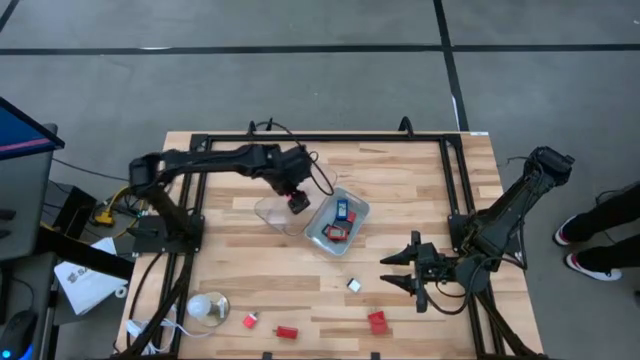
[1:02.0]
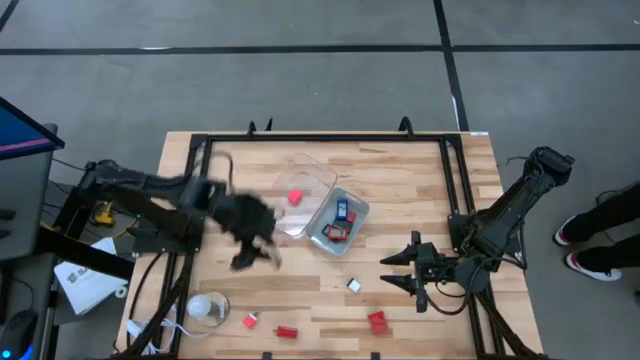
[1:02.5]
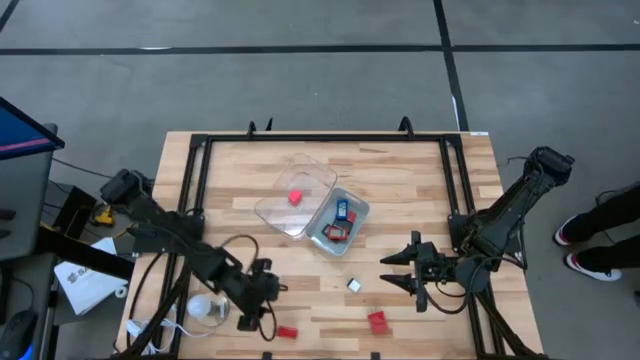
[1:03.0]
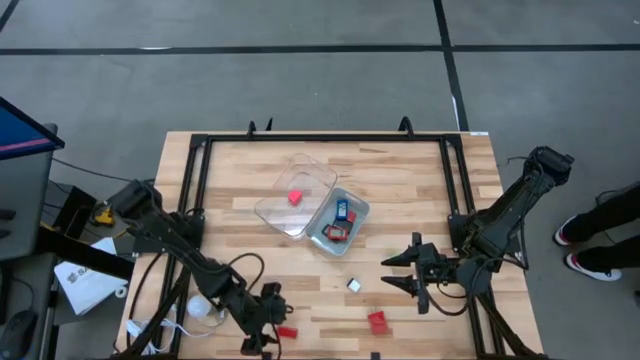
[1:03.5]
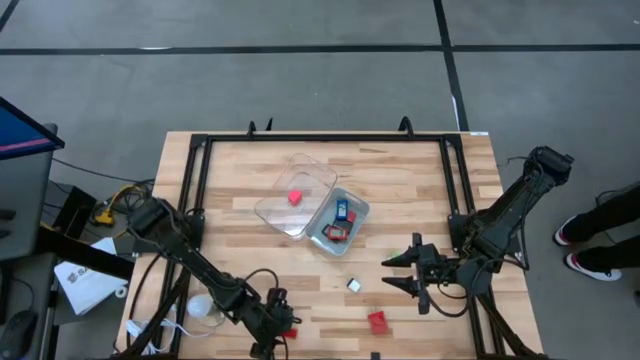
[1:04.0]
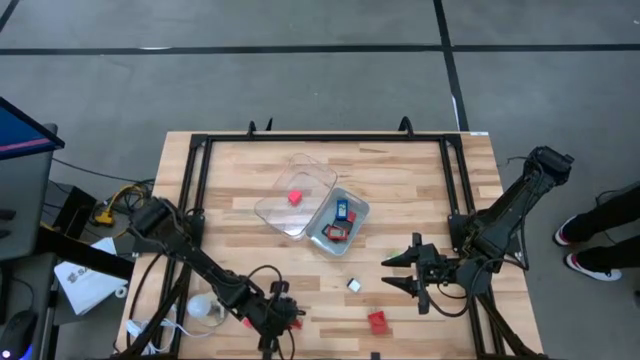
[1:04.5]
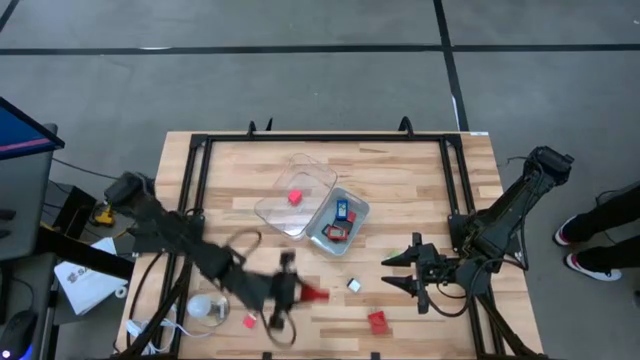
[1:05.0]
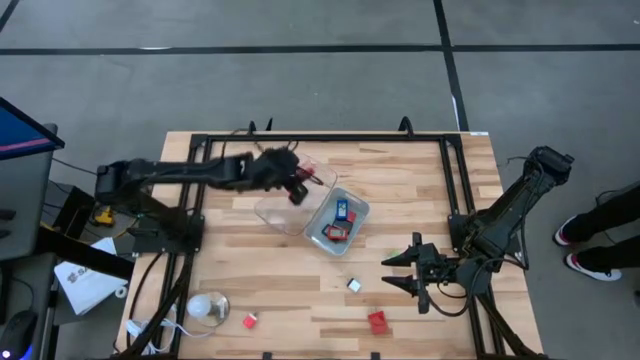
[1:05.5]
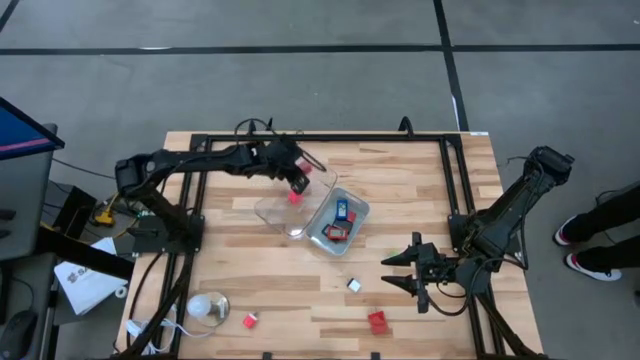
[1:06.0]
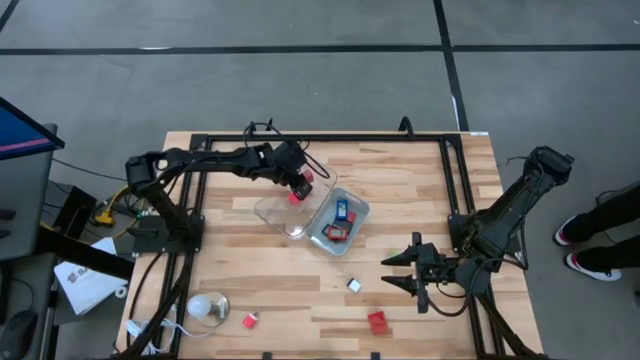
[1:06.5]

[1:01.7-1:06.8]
Task: Pick & Place Office items
Put the left red charger adapter into the transparent bin

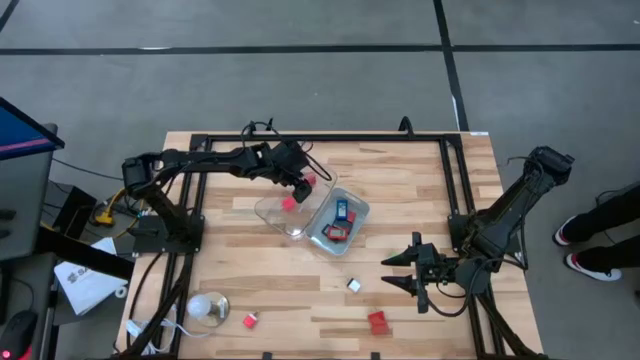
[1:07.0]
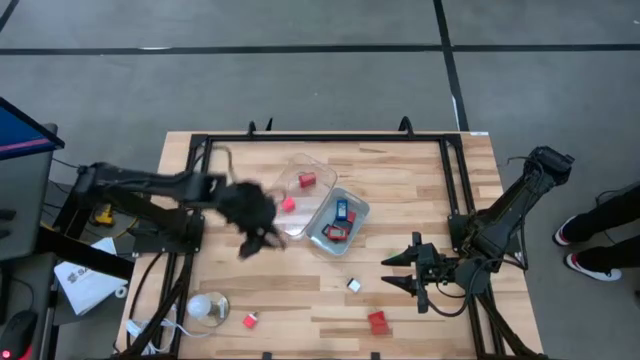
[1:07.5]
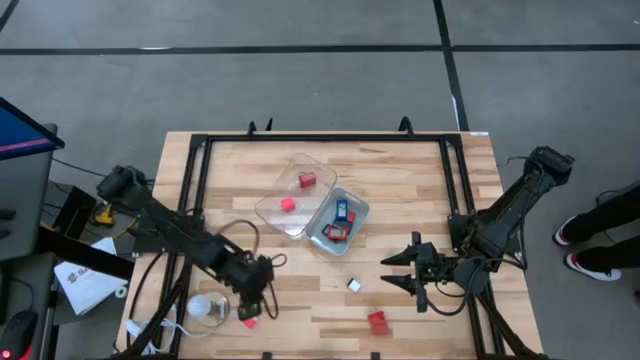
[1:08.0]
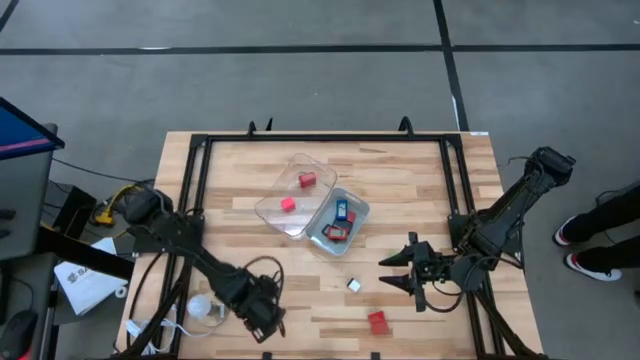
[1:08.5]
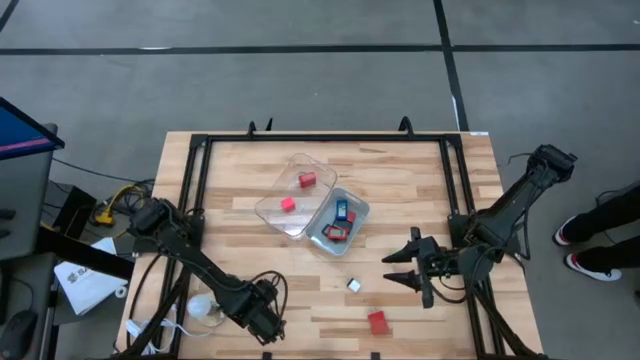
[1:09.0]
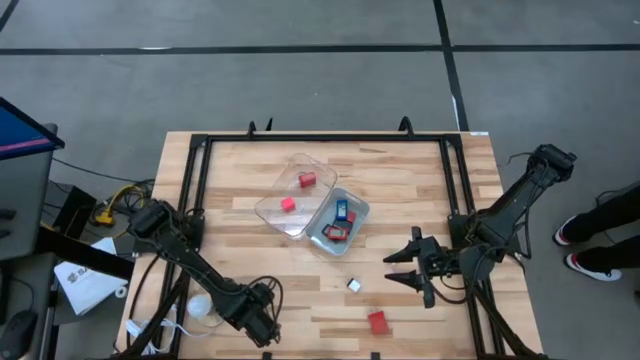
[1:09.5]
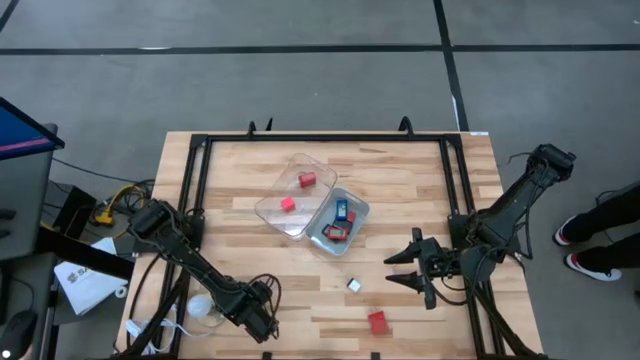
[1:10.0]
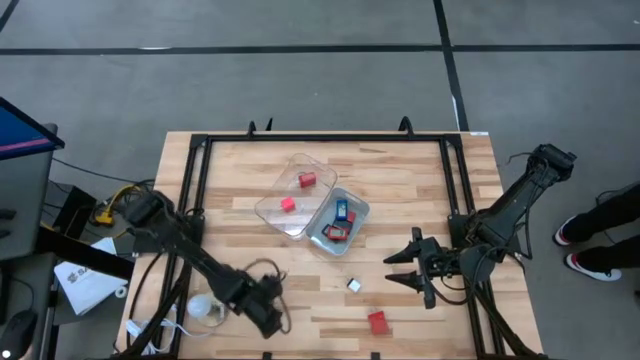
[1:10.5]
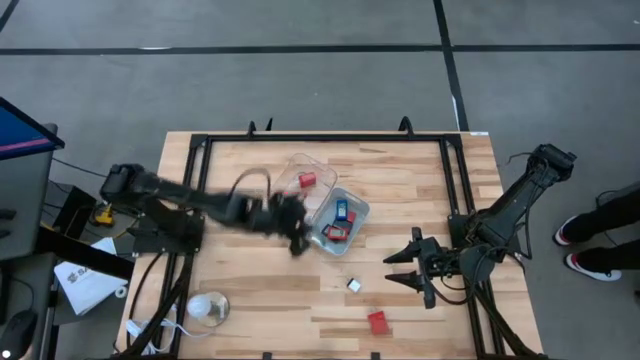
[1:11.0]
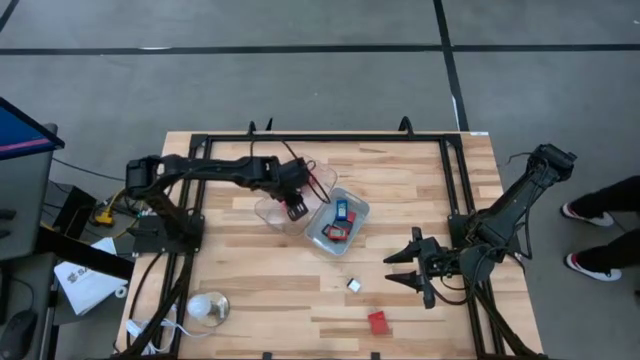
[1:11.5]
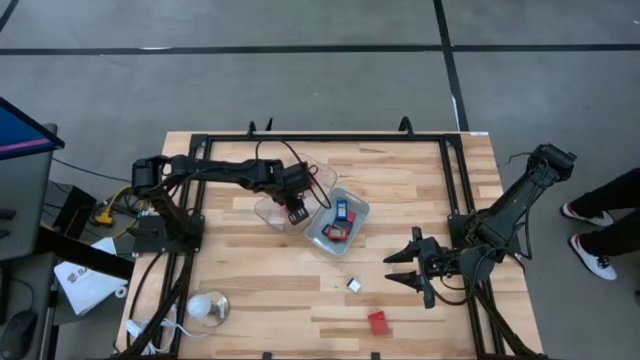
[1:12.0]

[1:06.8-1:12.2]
Put the pink charger adapter into the transparent bin

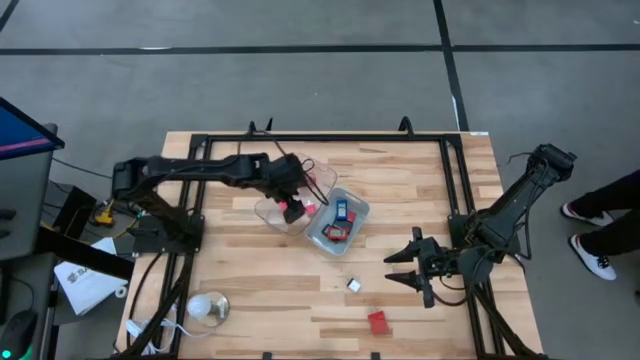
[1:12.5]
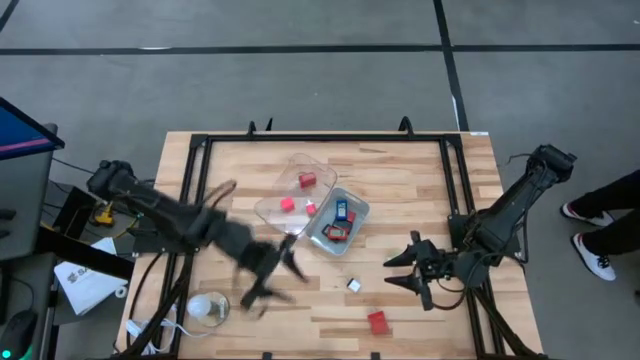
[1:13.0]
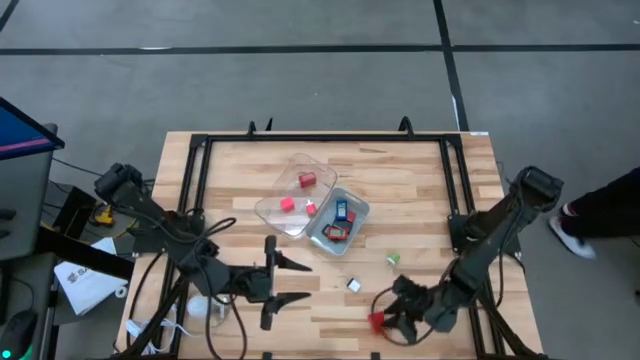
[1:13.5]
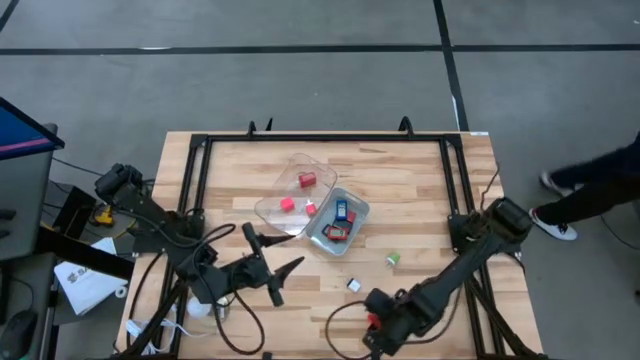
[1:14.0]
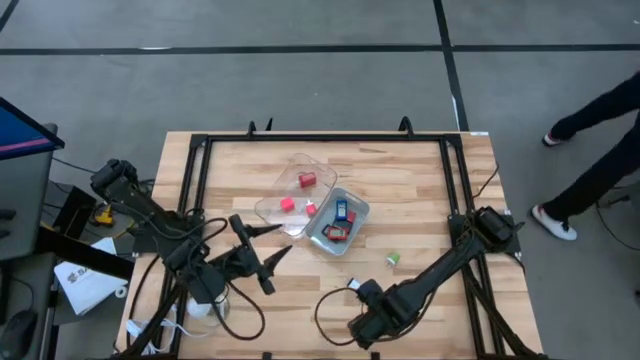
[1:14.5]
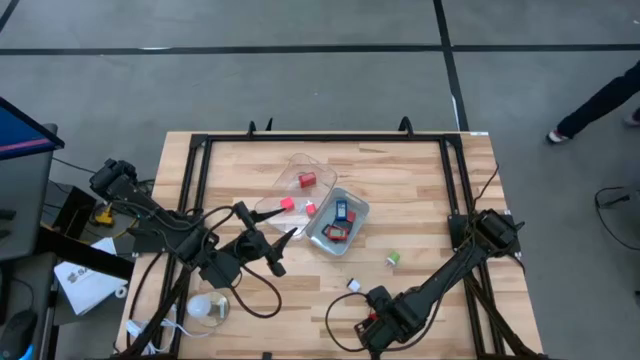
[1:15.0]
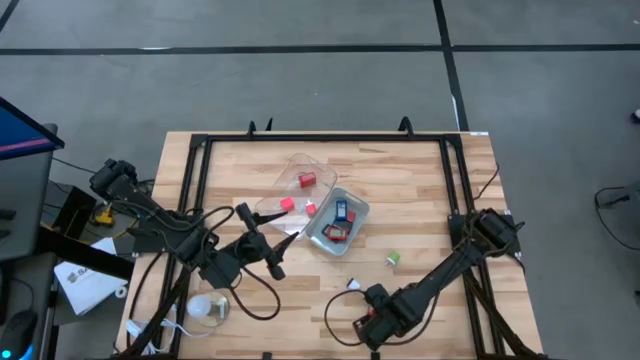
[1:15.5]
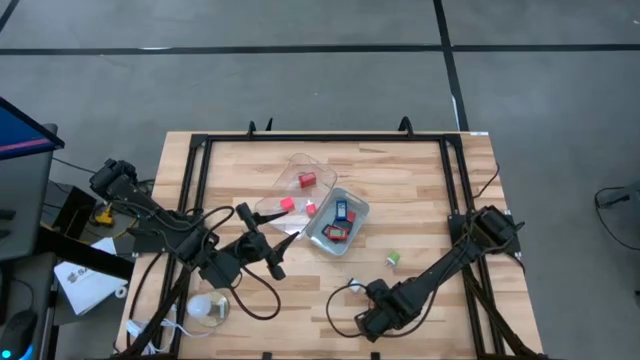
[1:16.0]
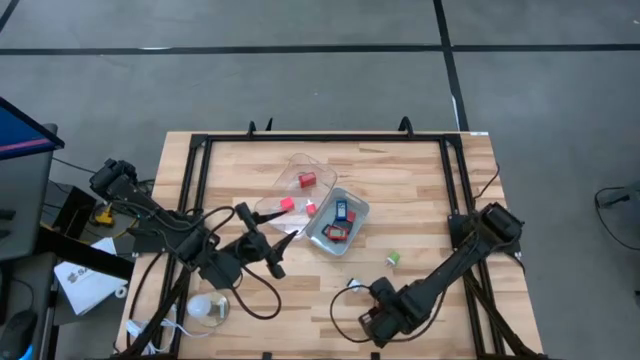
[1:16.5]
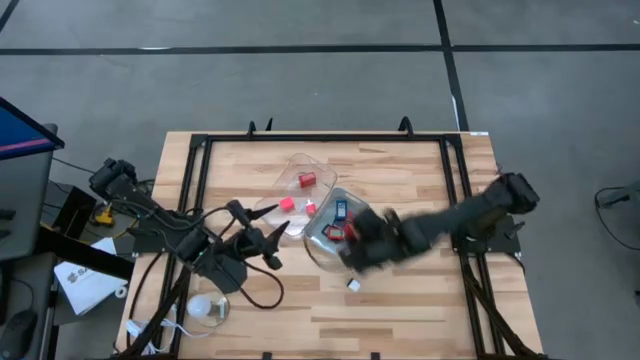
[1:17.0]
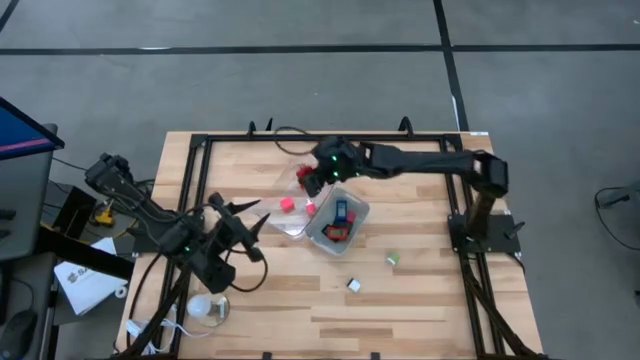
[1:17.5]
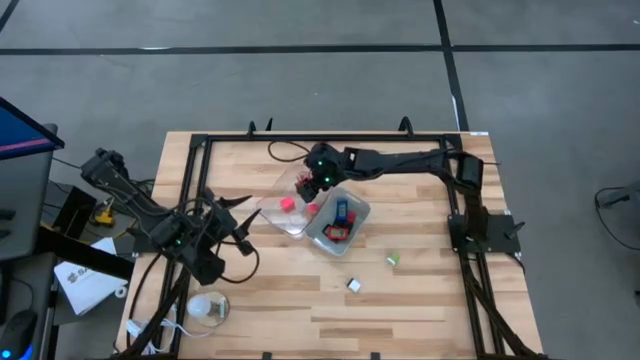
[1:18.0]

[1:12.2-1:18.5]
Put the red charger adapter into the transparent bin

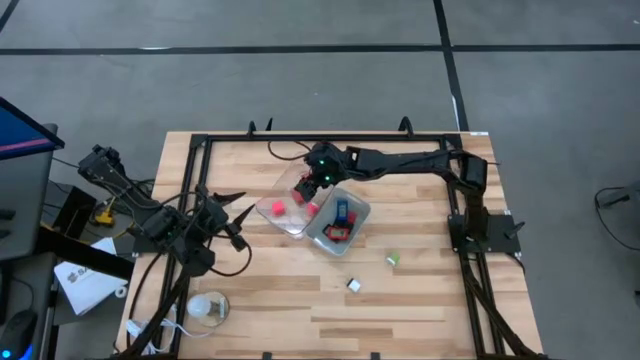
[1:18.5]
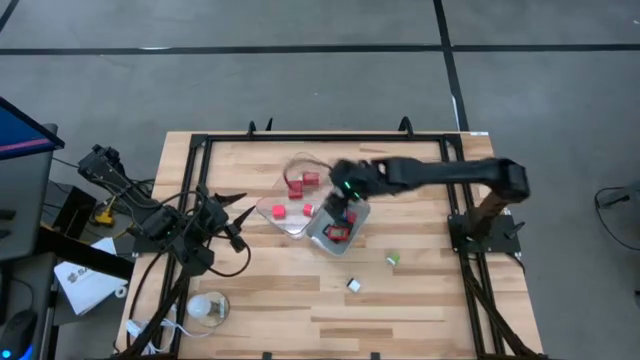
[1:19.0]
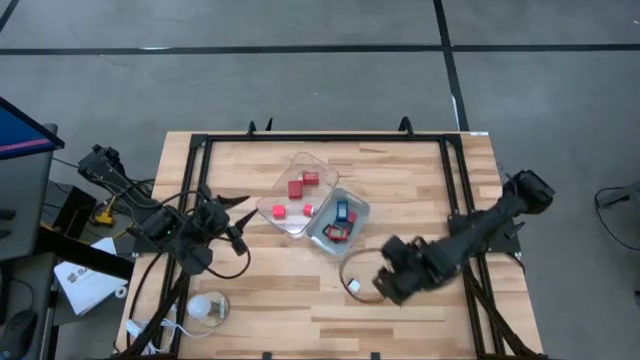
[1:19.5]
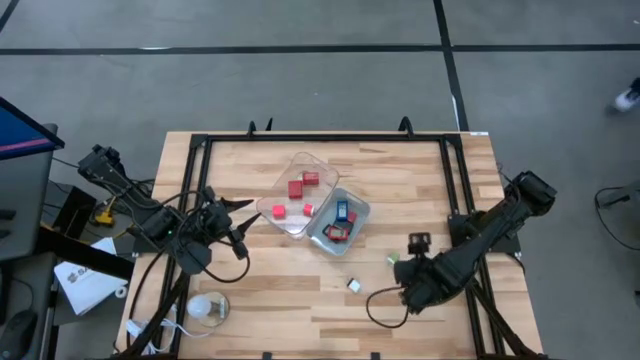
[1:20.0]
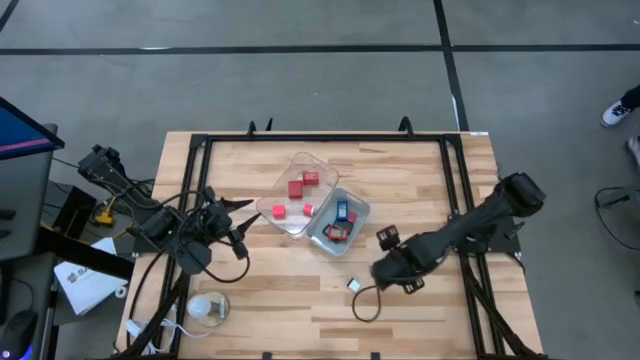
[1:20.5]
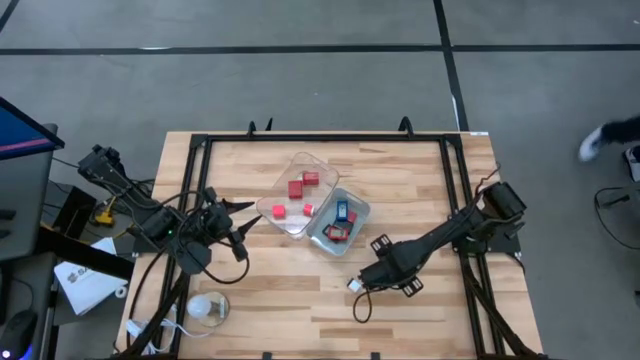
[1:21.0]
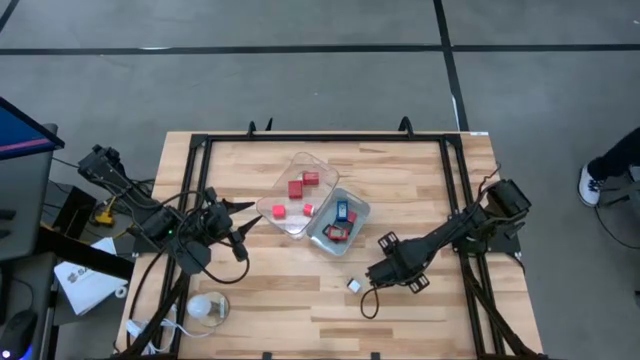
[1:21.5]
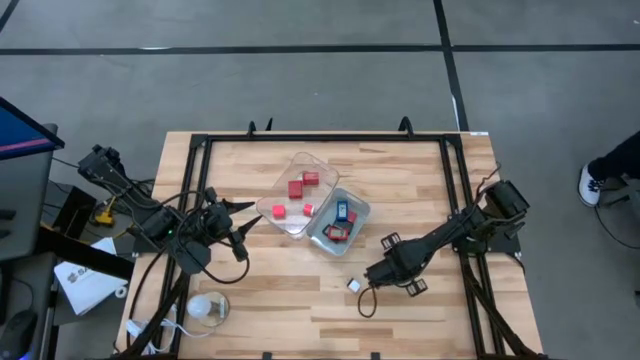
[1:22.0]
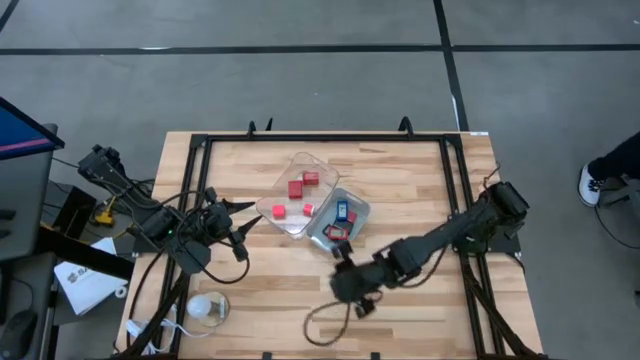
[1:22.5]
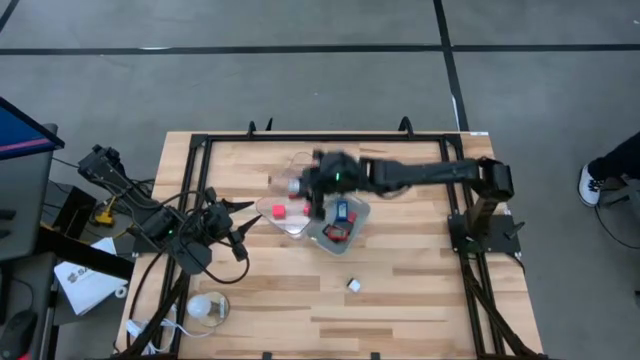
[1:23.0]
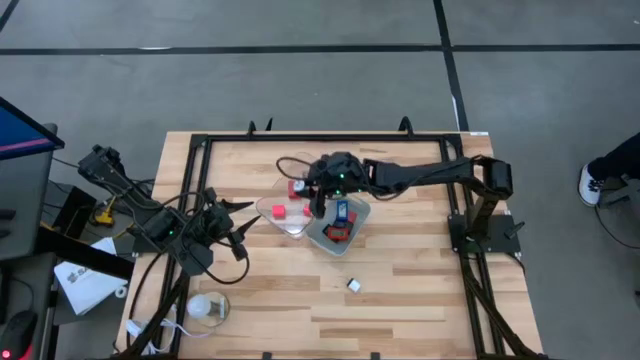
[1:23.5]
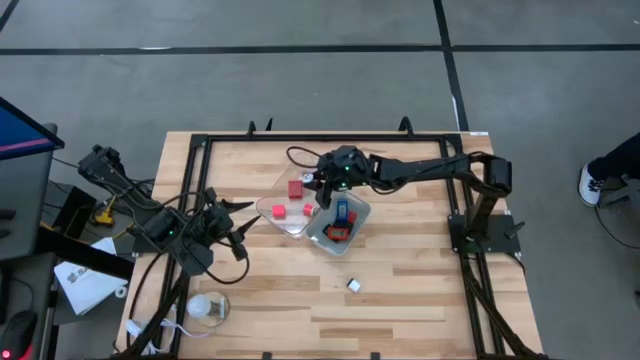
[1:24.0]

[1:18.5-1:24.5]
Put the green charger adapter into the transparent bin
